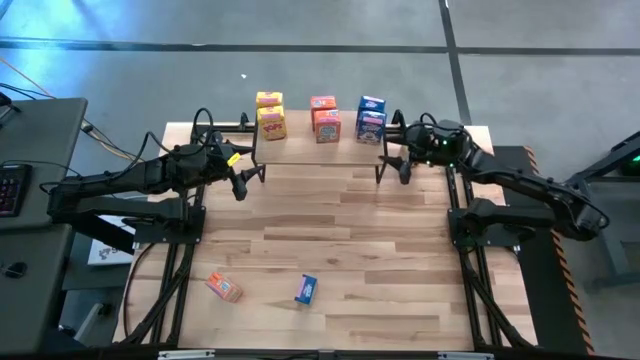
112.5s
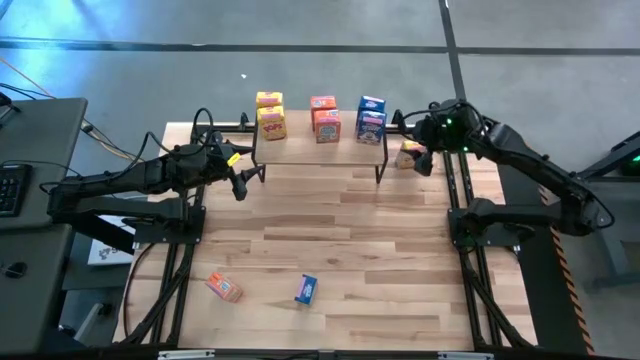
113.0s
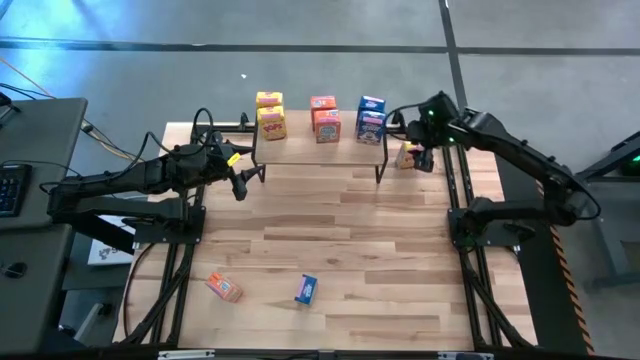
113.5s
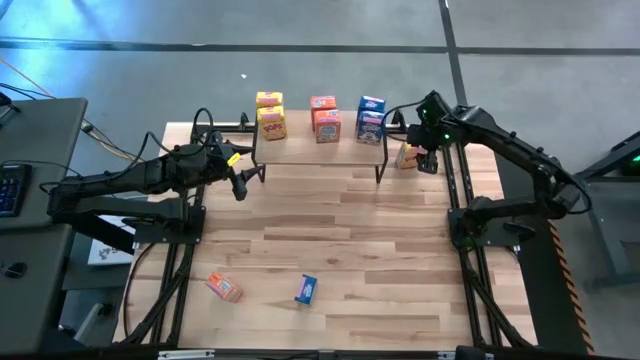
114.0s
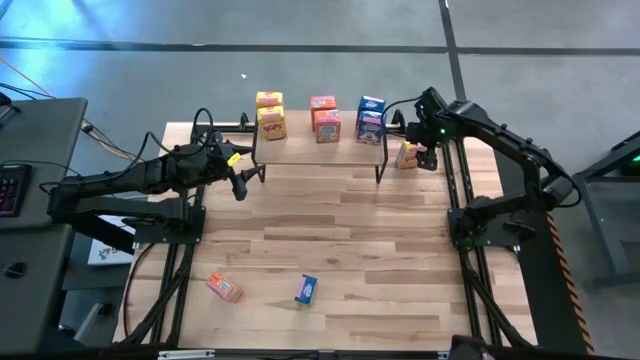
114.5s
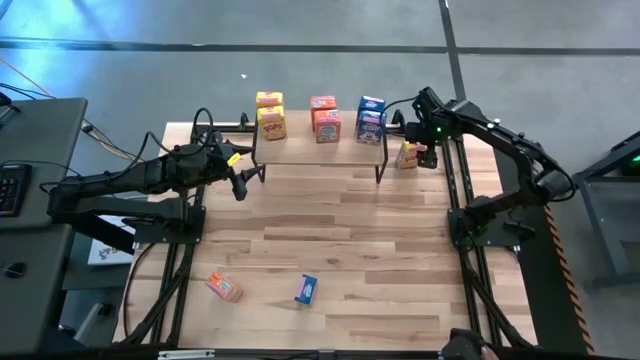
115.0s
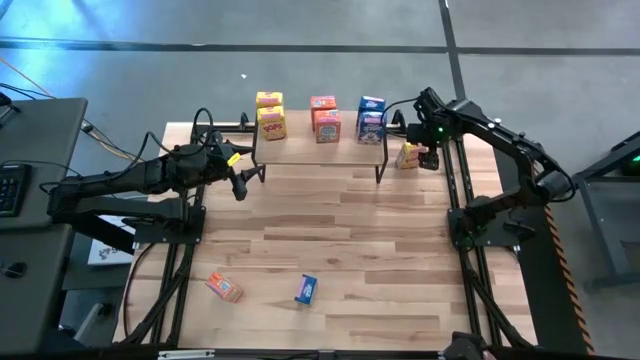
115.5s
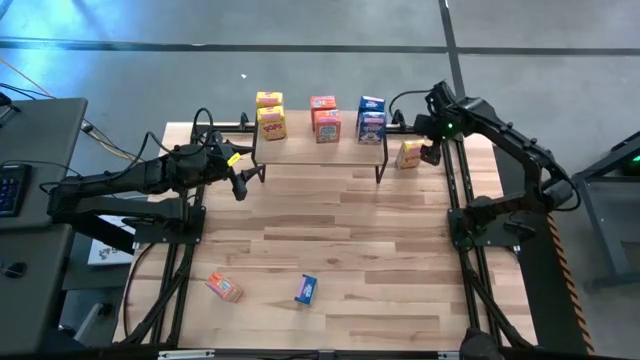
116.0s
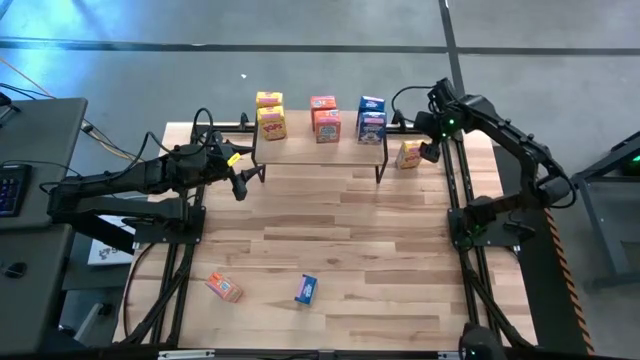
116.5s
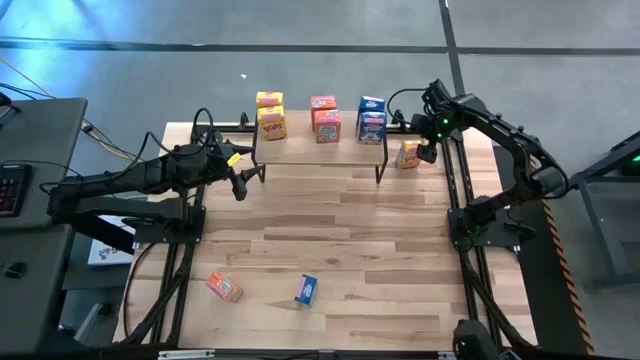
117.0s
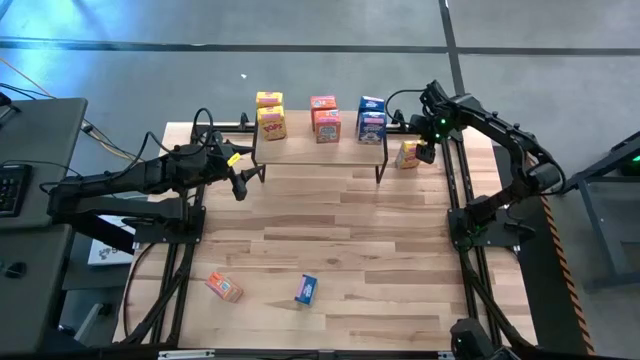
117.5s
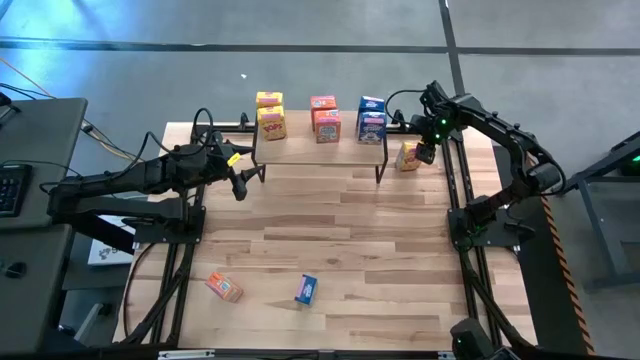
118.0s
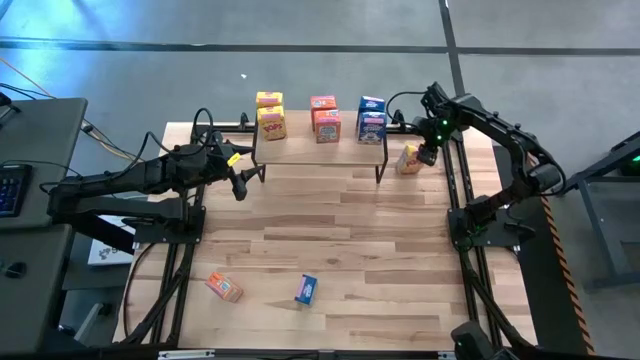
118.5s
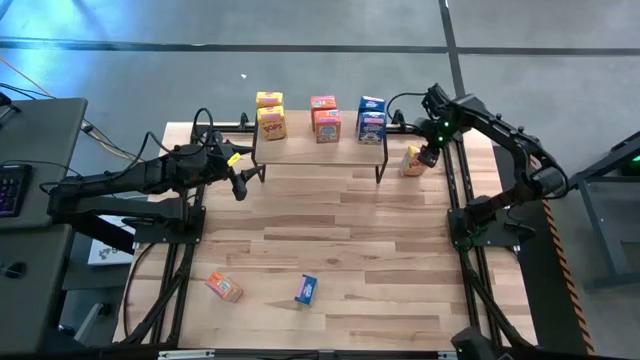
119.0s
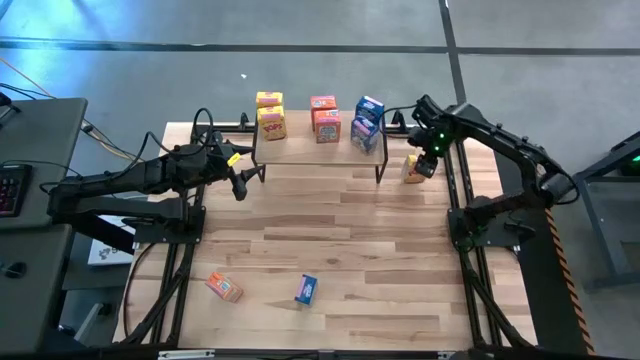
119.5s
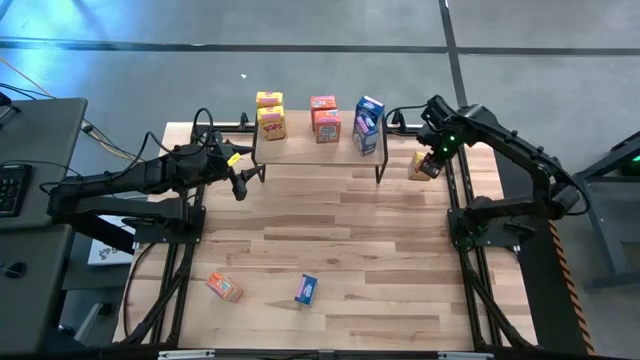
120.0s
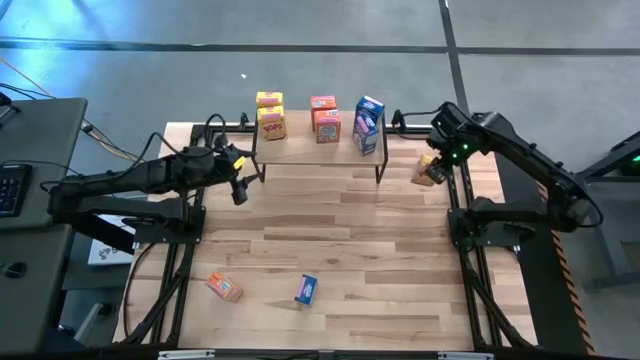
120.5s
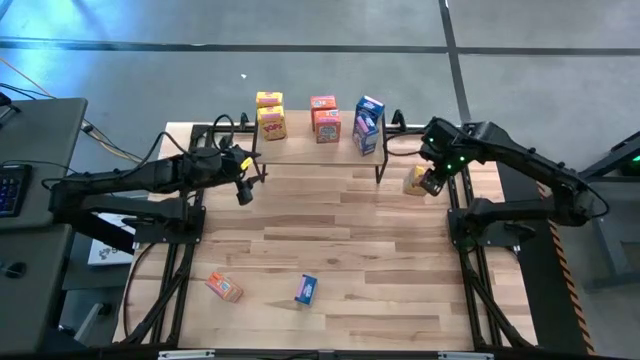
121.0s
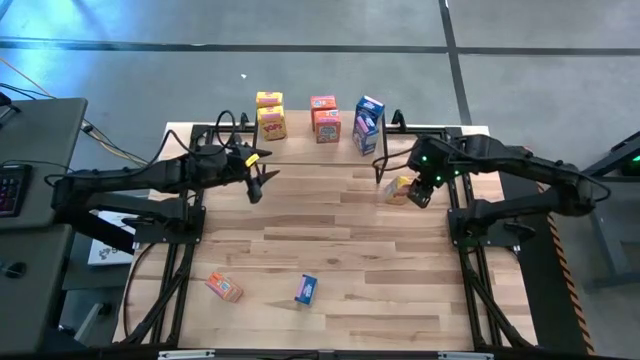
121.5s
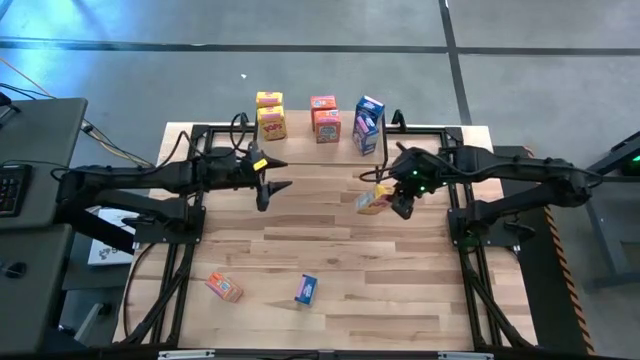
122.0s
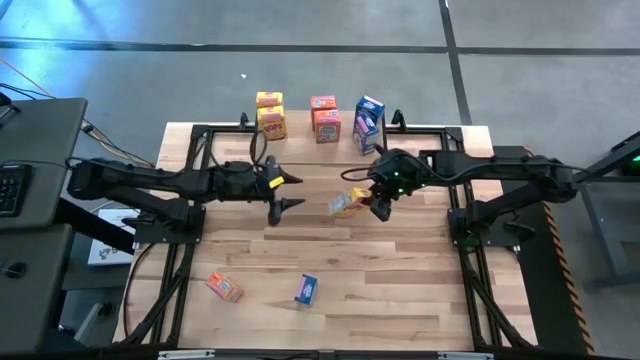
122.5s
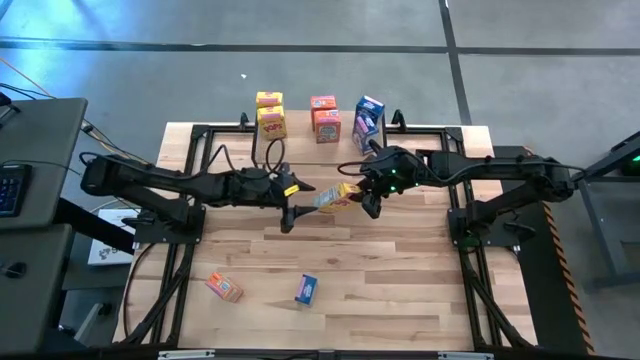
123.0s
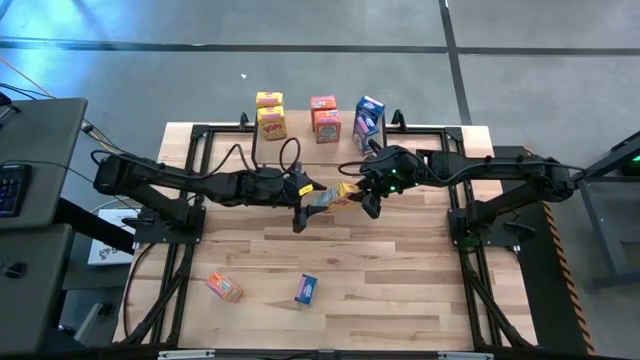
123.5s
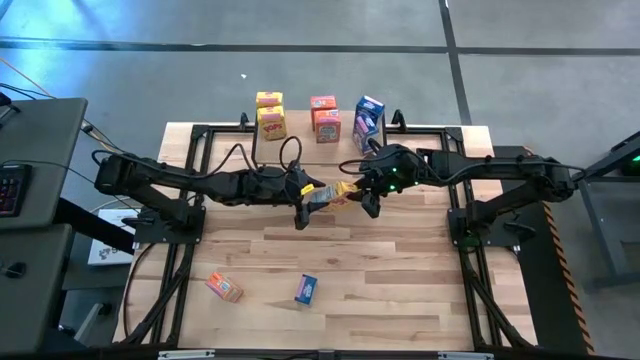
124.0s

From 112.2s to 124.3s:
Task: Stack cereal on shelf
Put the yellow cereal box aligned with the other yellow cereal box on the shelf

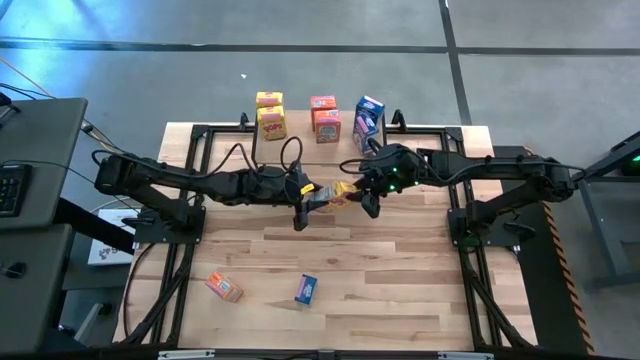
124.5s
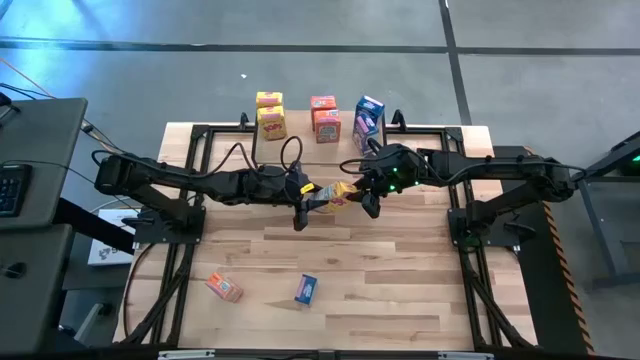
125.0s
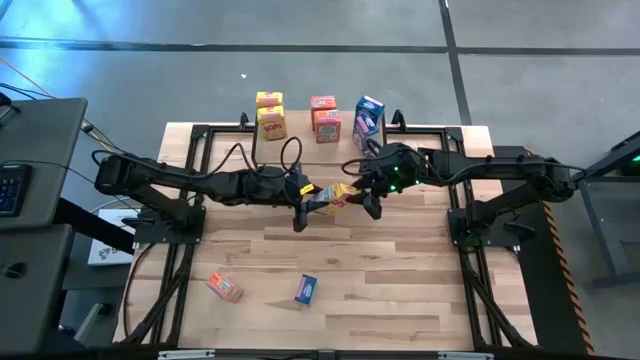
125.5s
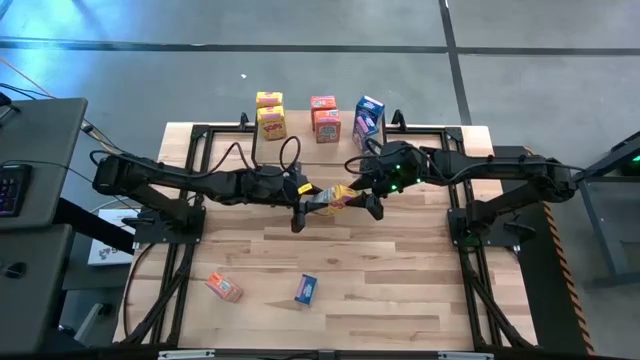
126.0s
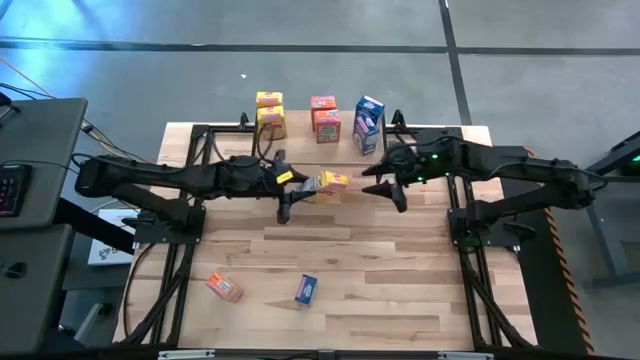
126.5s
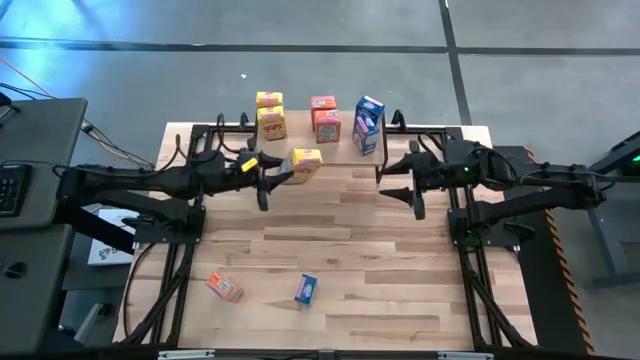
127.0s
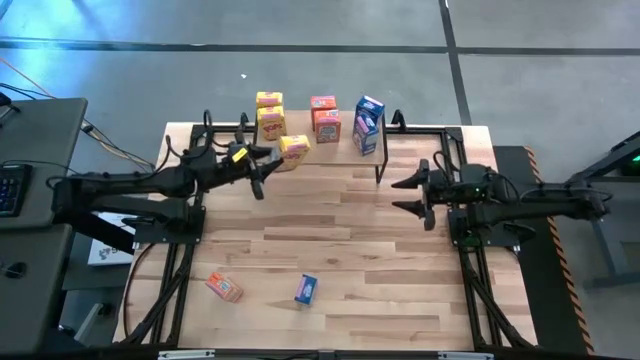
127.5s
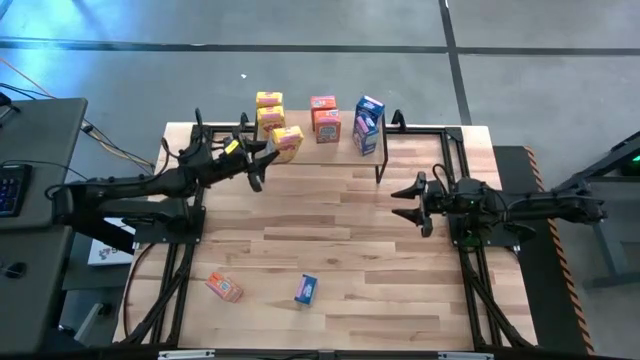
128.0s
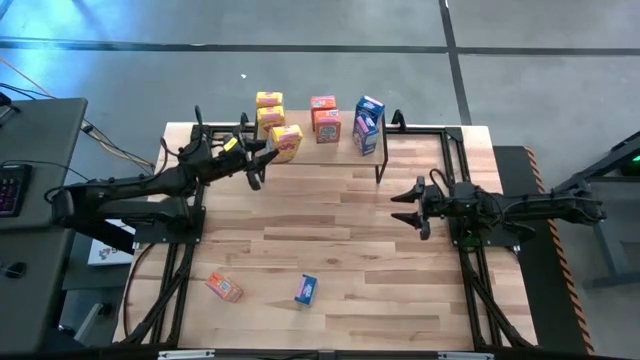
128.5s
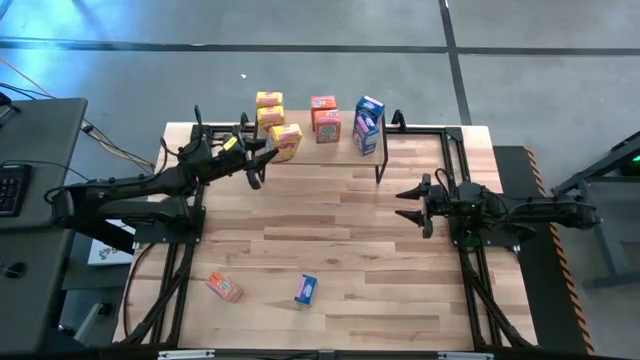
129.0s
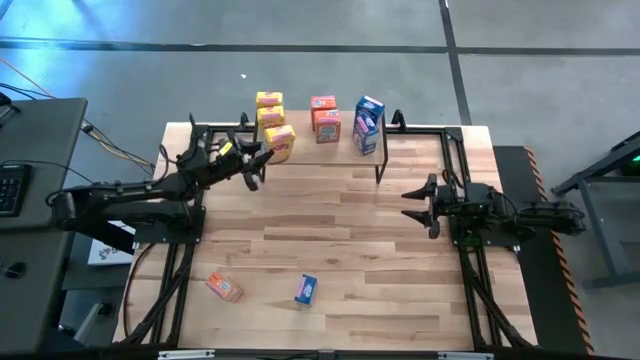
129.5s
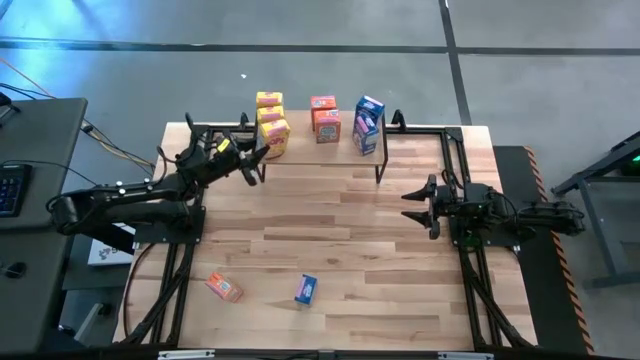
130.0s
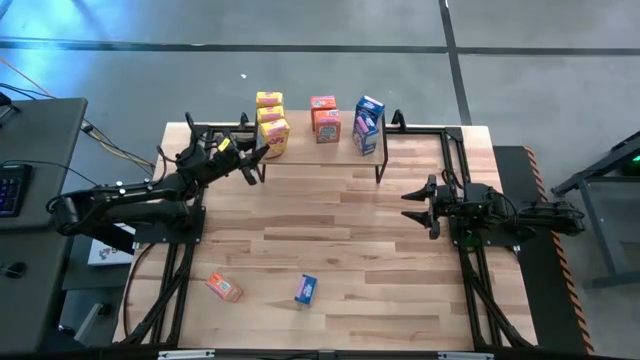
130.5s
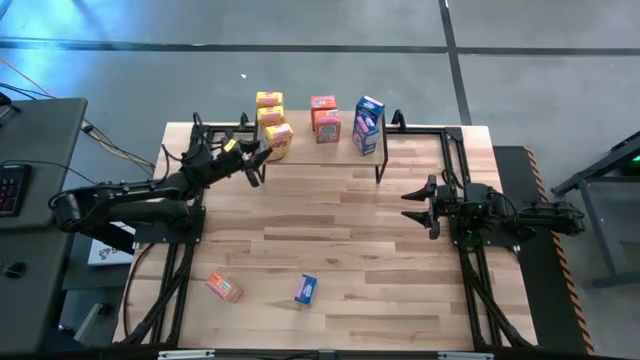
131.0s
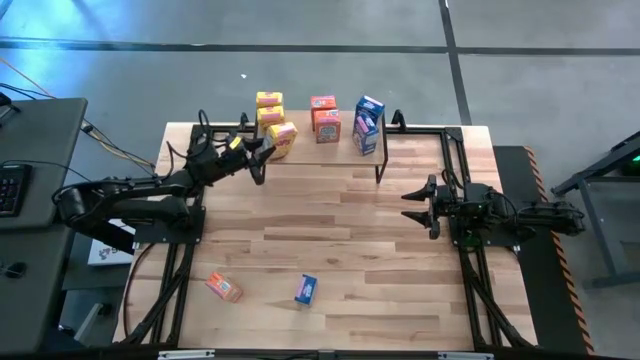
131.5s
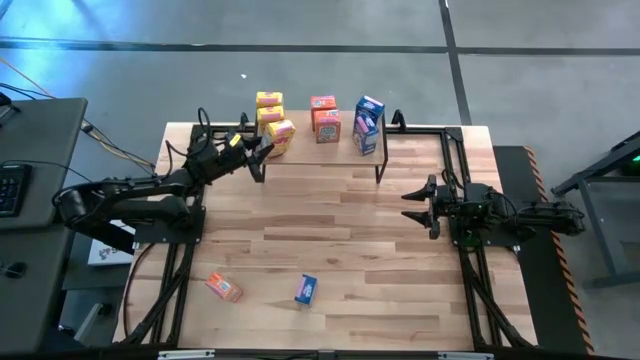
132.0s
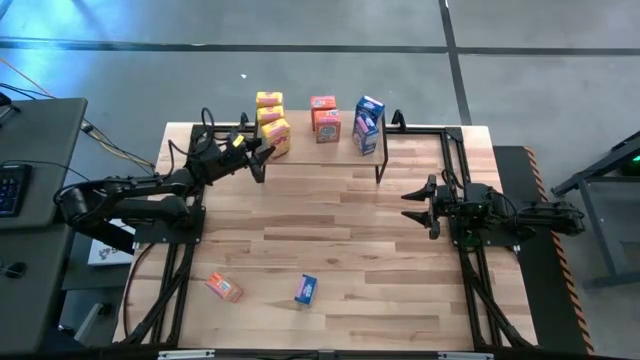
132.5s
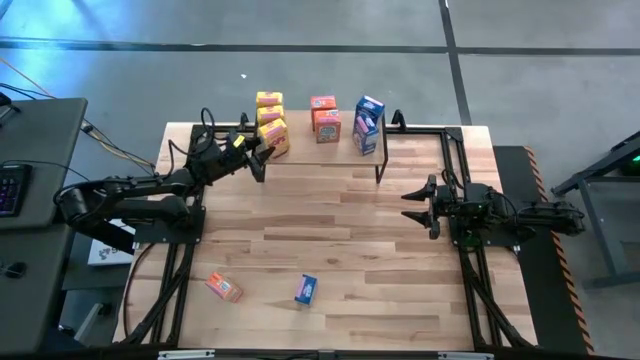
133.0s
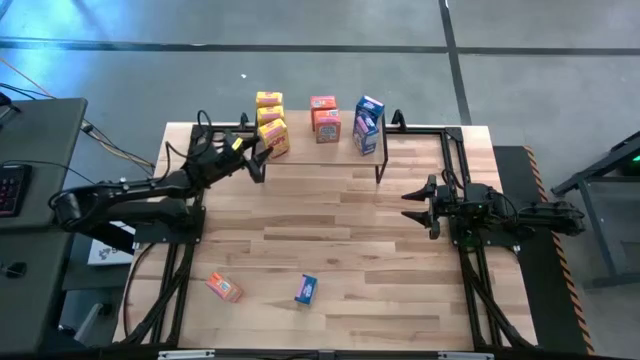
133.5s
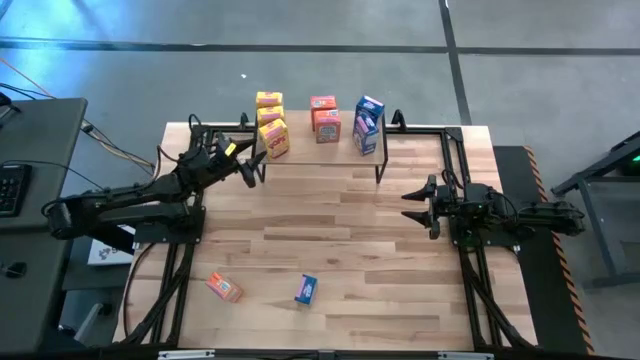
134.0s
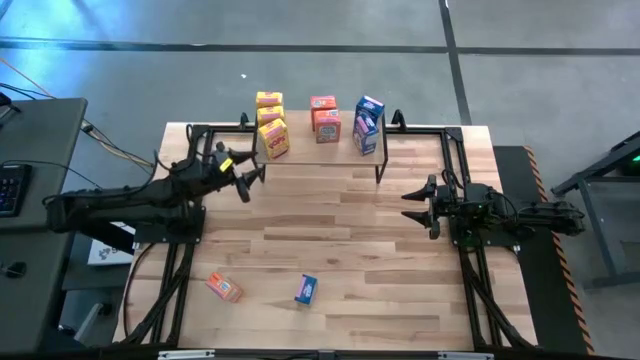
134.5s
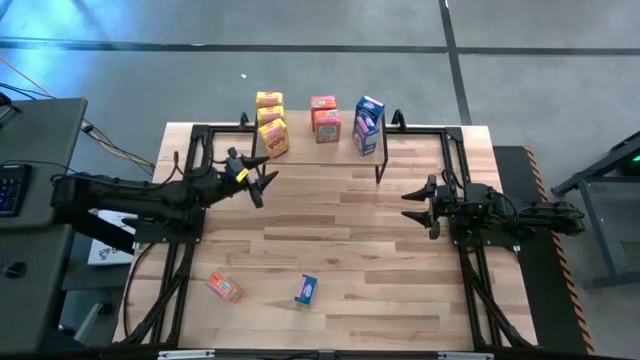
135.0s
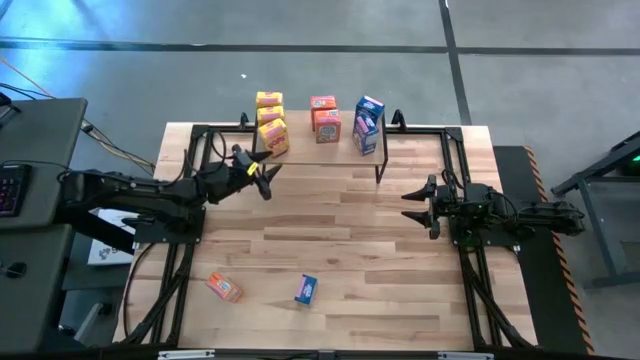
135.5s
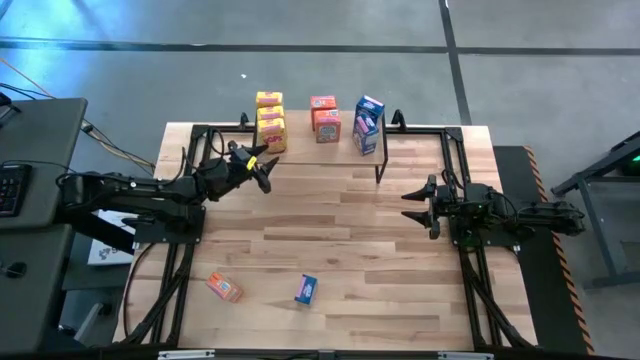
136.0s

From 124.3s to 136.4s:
Put the yellow cereal box aligned with the other yellow cereal box on the shelf
